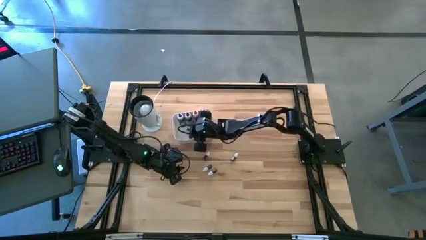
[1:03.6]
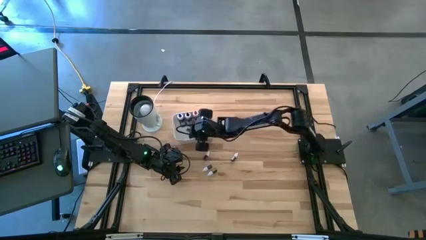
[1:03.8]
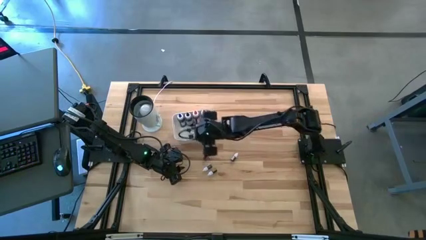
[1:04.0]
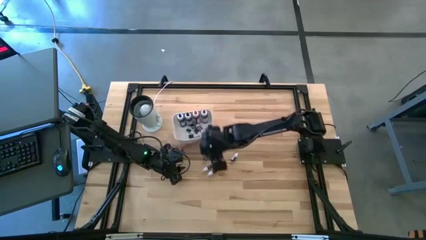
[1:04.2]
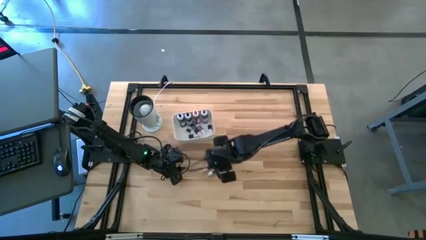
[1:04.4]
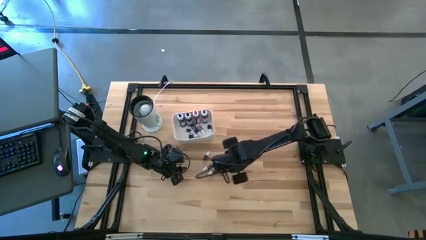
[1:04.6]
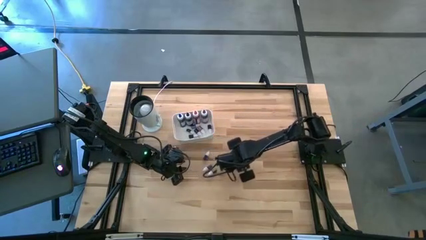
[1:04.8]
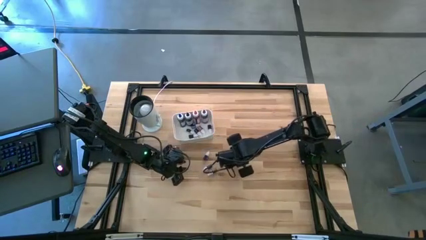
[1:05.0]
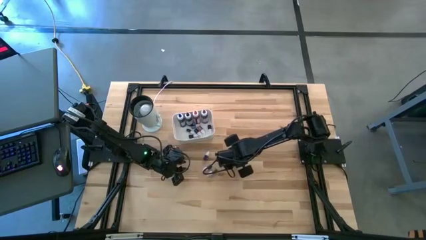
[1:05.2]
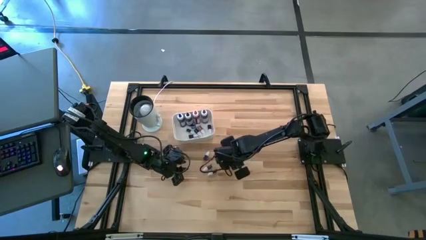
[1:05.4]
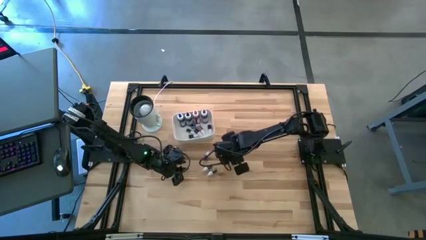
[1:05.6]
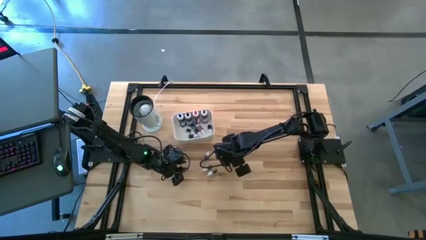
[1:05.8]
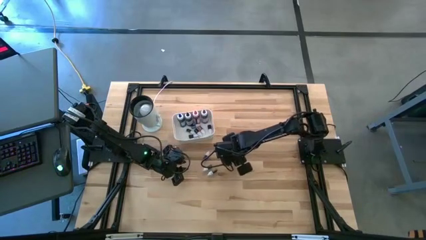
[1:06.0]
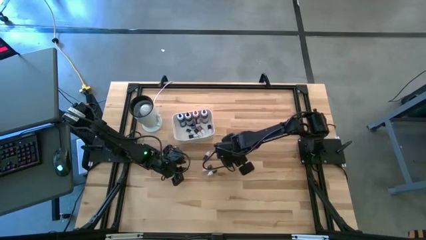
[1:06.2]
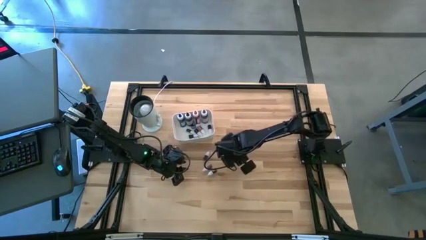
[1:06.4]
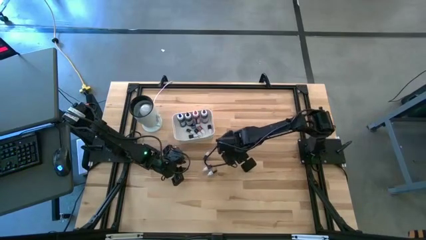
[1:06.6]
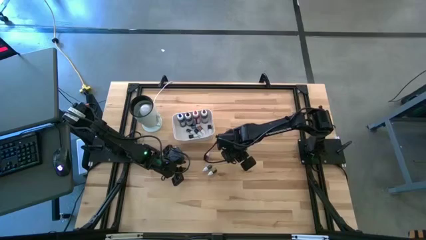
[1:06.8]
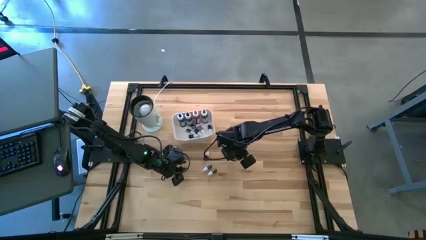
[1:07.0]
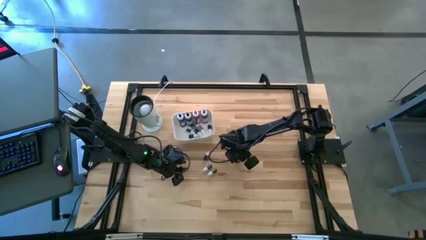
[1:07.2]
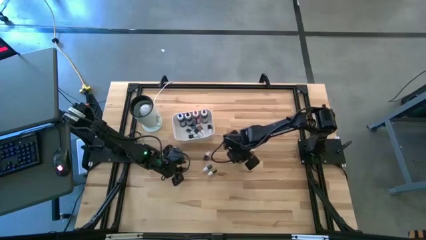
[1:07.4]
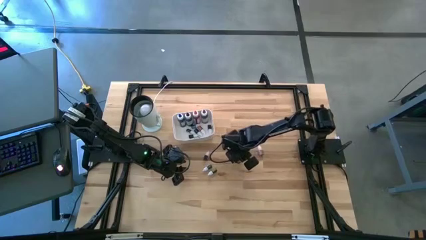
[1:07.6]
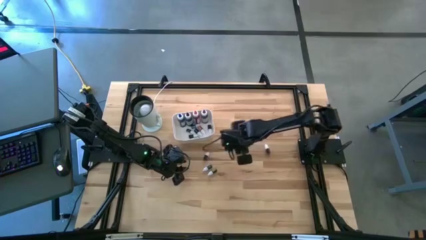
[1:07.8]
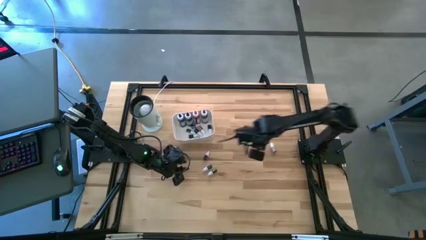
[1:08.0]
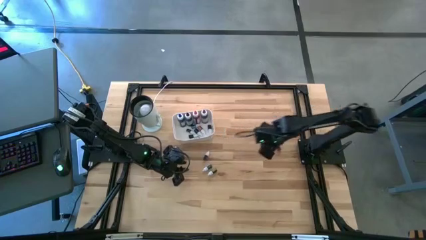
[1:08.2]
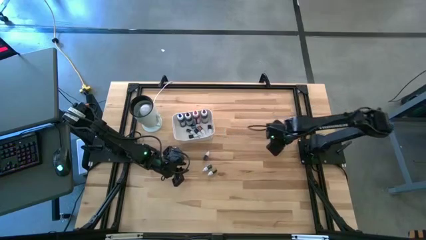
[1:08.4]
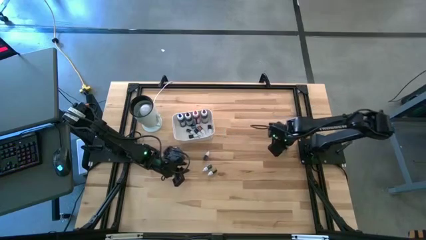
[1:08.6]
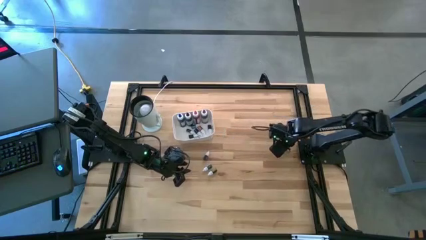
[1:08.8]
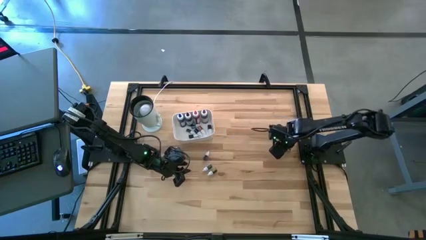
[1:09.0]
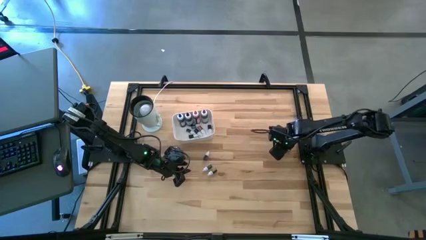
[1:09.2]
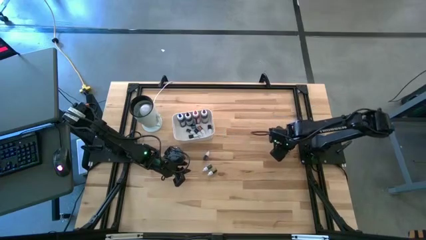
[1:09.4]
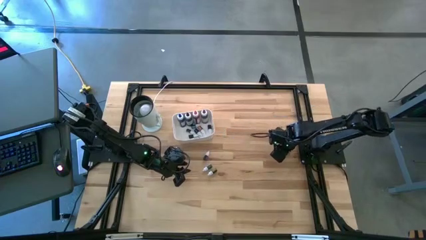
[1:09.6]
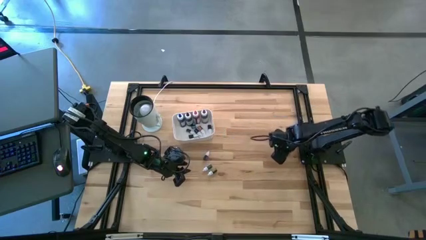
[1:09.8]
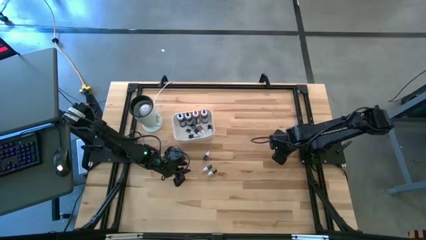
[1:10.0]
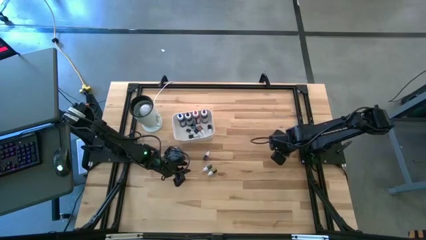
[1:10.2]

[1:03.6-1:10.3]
Task: Pick & Place food coloring
Put the small red food coloring bottle into the white bin

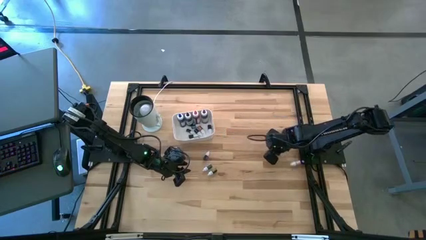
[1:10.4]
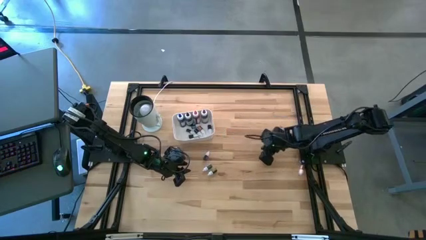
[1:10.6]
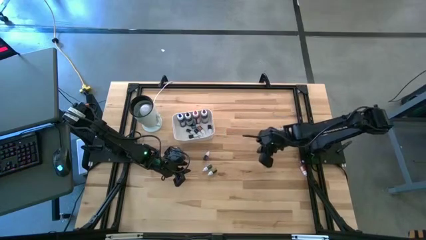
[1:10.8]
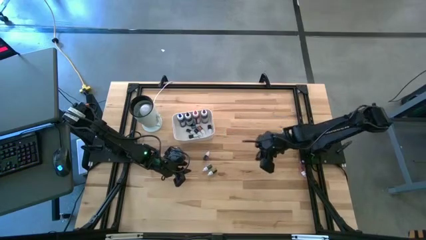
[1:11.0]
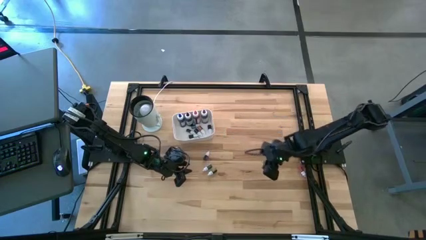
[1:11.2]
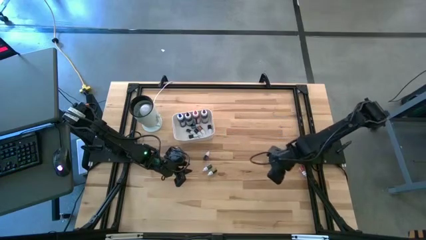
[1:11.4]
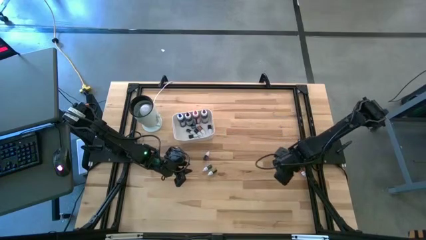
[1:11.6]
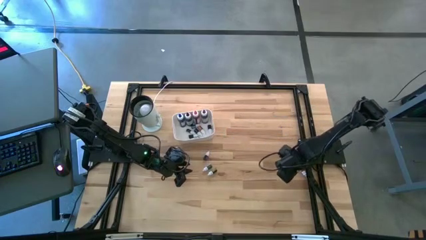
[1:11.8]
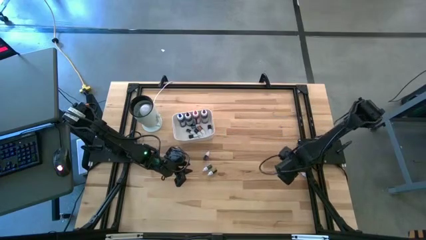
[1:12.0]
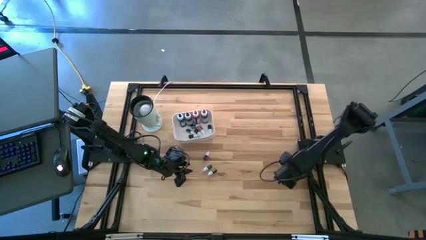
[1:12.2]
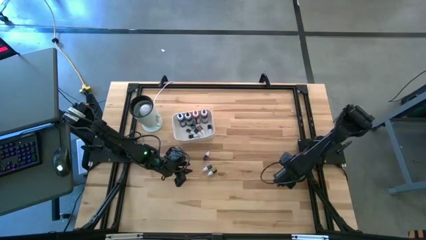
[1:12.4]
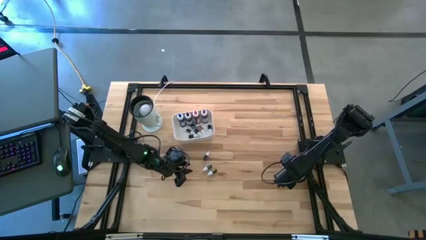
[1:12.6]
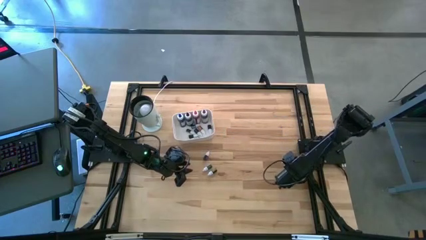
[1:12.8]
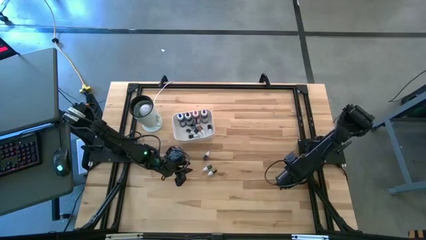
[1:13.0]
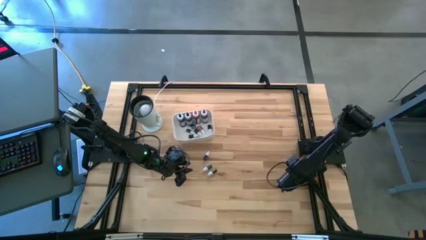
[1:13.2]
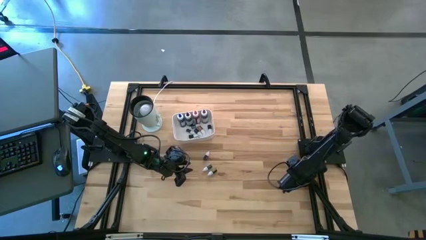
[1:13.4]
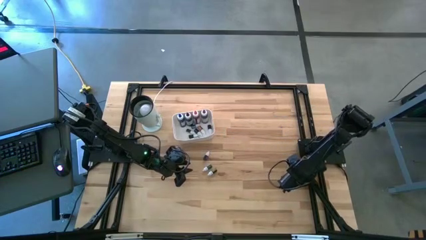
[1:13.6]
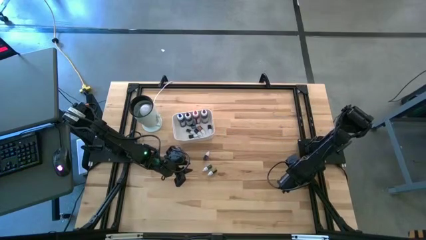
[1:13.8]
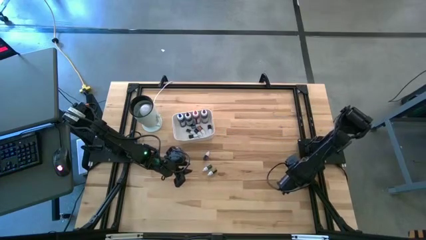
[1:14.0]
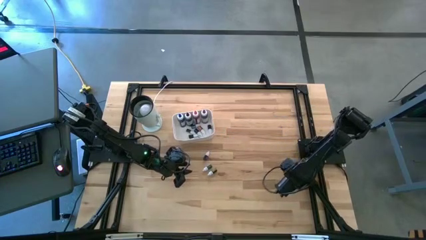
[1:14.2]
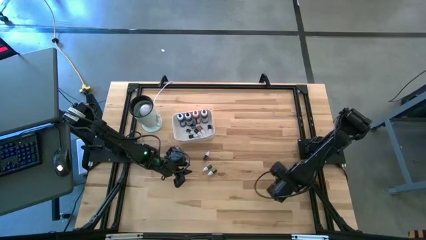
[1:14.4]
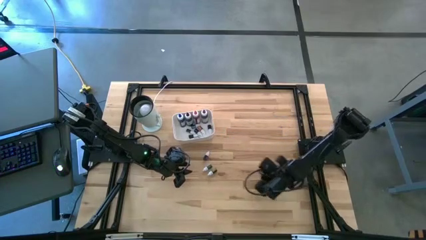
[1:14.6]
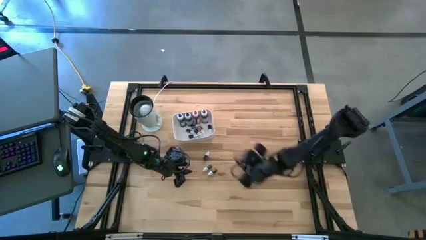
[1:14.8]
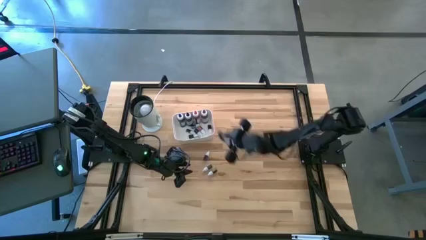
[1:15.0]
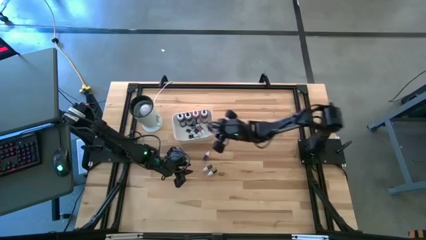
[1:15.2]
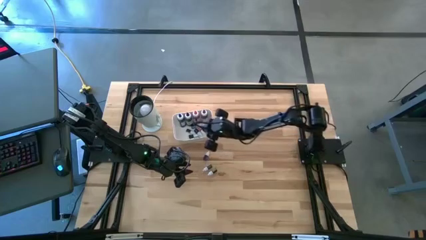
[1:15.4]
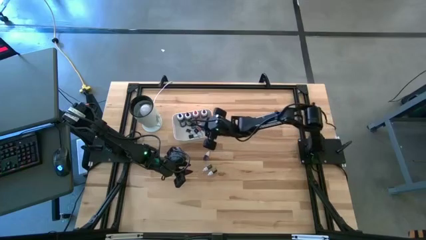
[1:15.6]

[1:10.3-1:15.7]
Put the small red food coloring bottle into the white bin

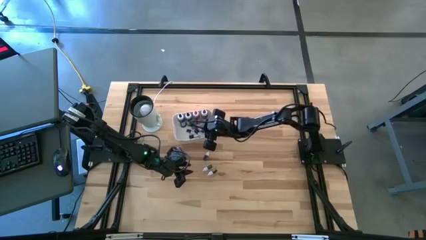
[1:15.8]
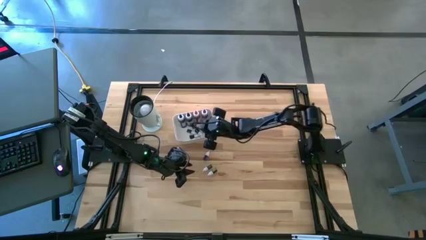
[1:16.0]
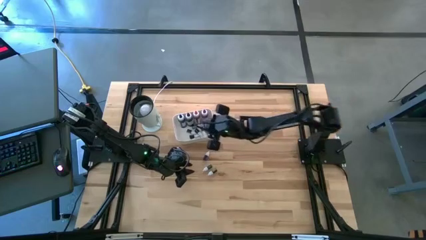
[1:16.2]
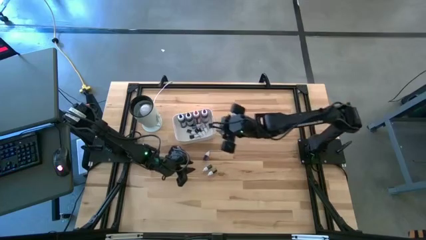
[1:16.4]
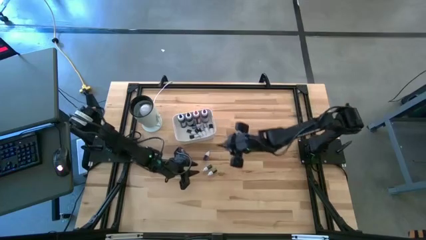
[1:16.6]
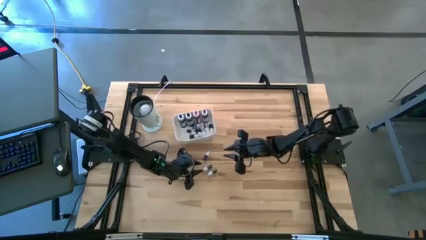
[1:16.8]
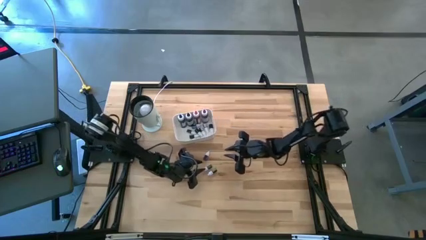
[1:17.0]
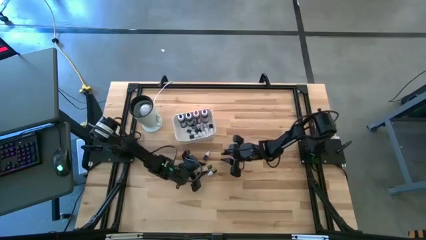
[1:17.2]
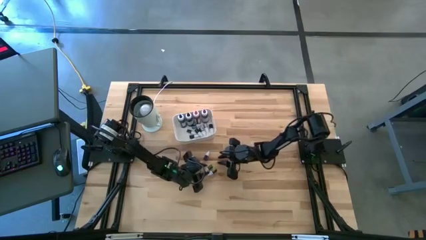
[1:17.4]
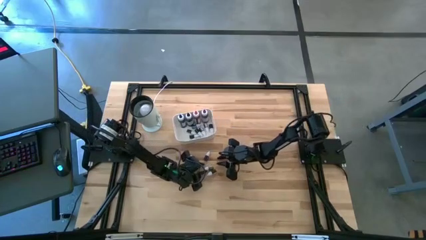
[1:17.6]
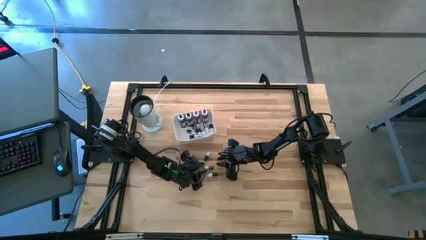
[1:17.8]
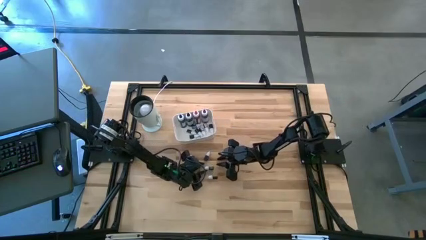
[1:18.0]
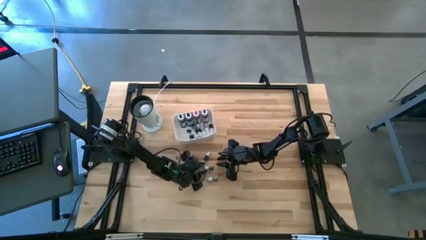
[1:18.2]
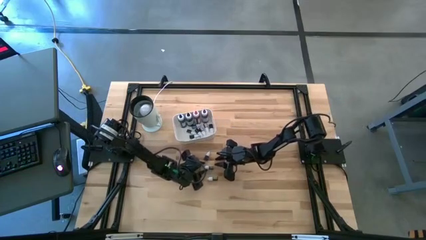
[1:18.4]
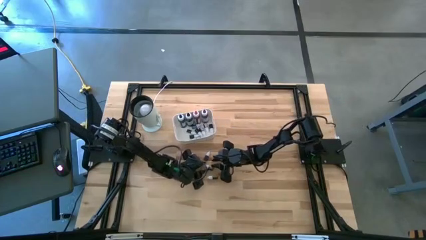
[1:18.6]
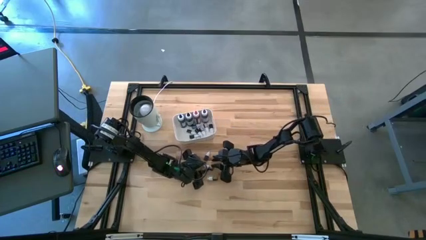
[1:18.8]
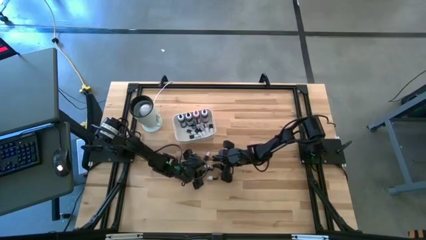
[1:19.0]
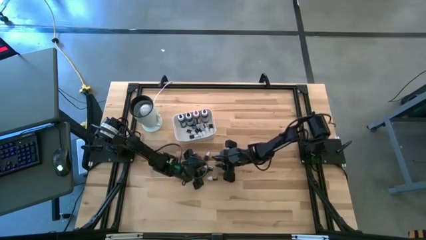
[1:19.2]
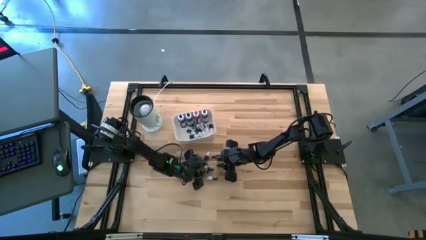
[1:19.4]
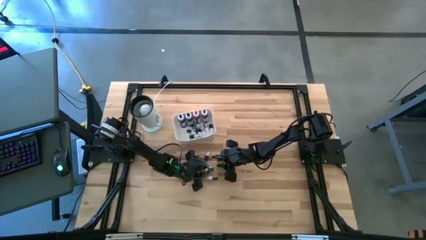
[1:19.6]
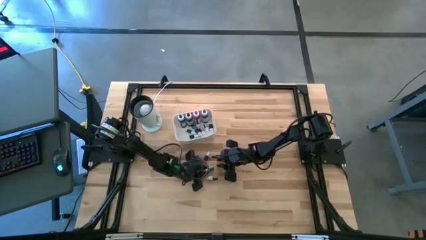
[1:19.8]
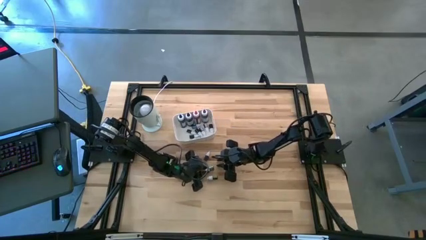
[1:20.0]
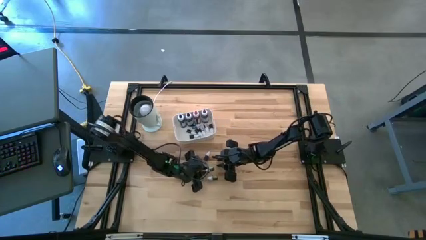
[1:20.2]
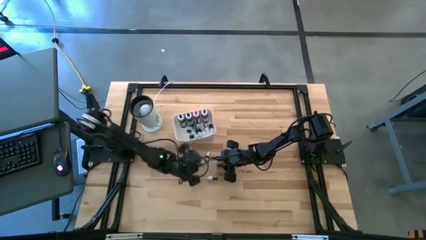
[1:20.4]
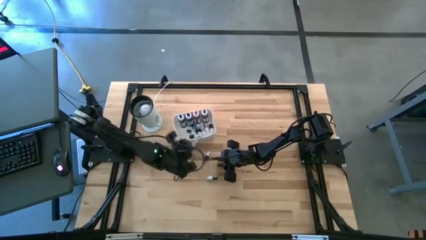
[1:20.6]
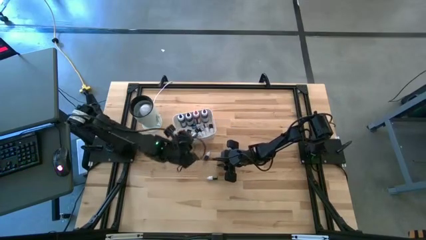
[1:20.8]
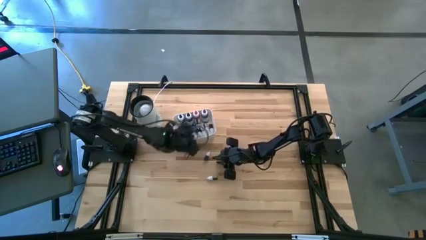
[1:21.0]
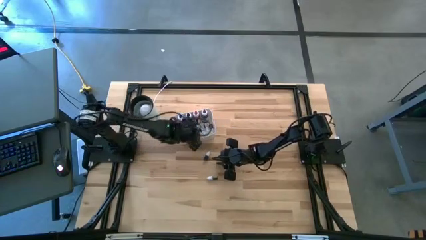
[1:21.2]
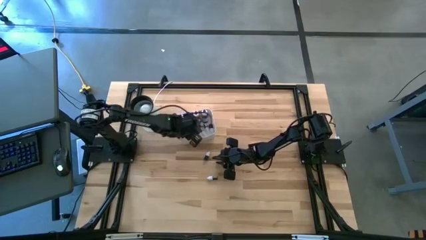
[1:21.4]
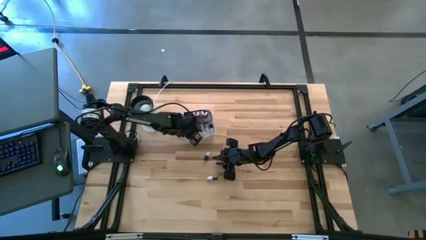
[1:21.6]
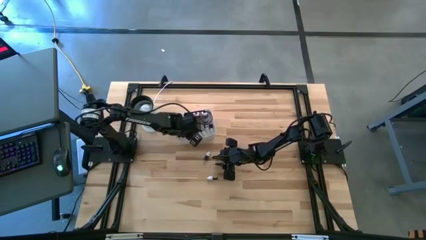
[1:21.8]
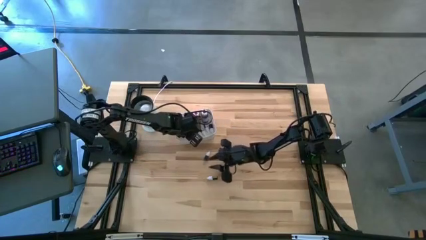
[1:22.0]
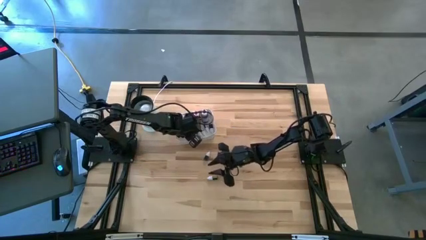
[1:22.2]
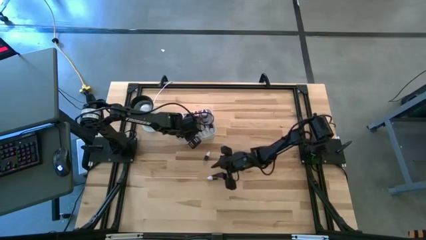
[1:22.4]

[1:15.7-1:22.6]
Put the small green food coloring bottle into the white bin
